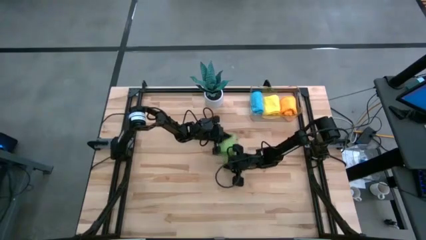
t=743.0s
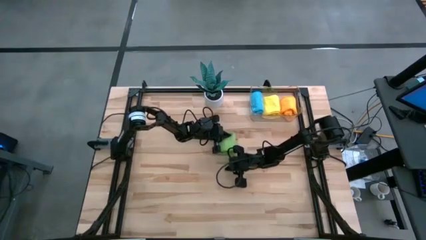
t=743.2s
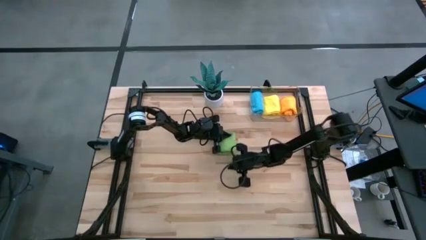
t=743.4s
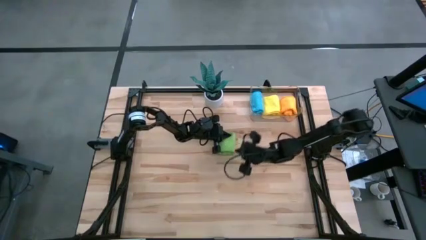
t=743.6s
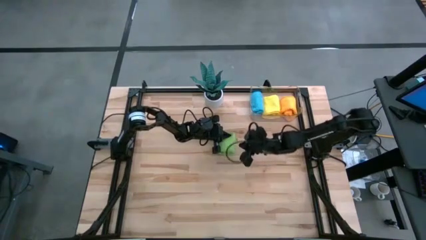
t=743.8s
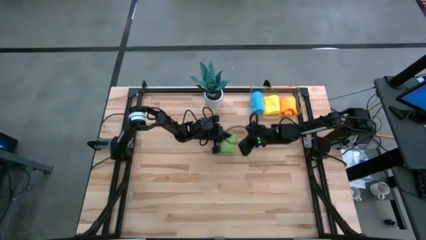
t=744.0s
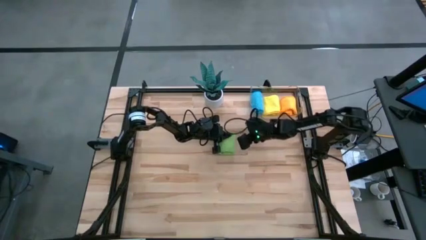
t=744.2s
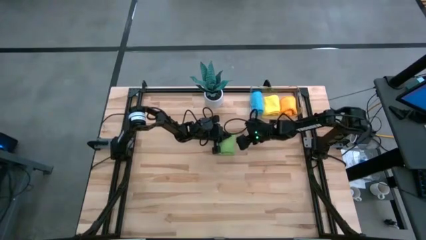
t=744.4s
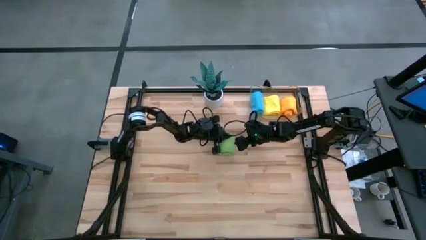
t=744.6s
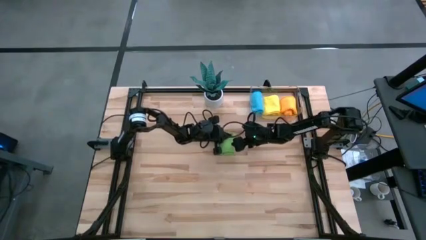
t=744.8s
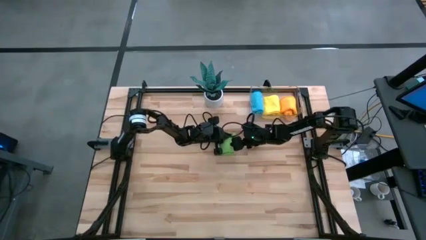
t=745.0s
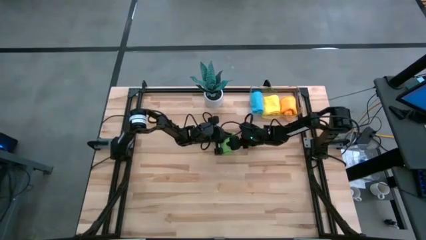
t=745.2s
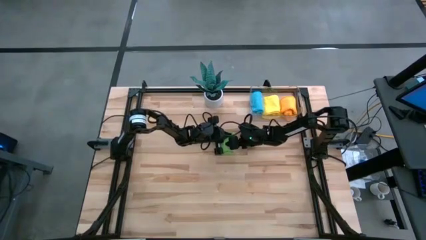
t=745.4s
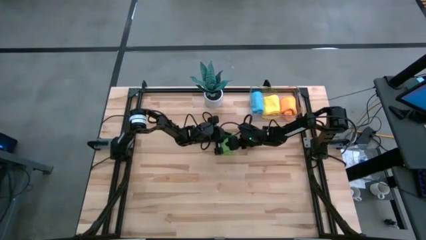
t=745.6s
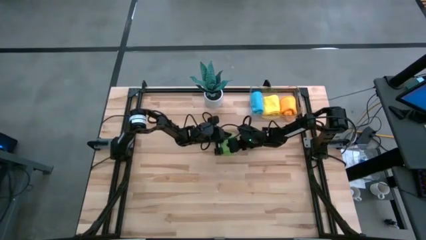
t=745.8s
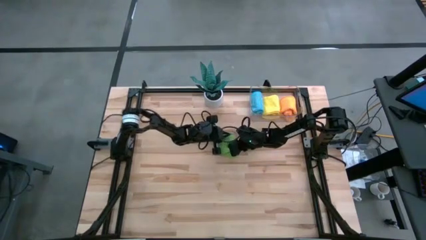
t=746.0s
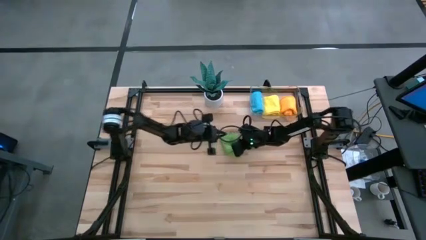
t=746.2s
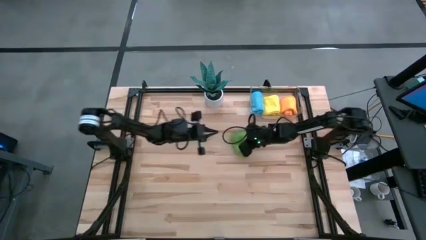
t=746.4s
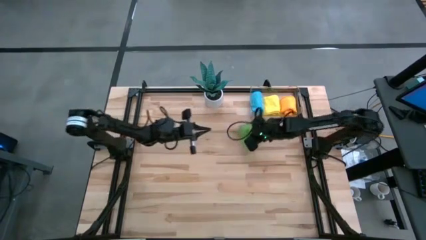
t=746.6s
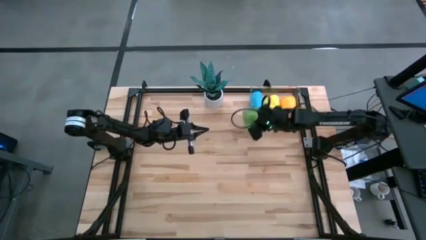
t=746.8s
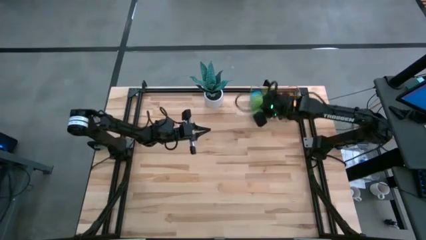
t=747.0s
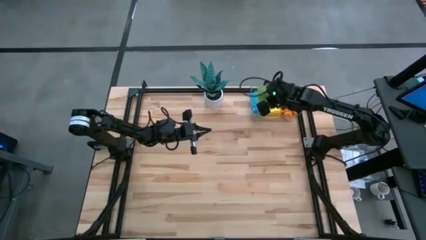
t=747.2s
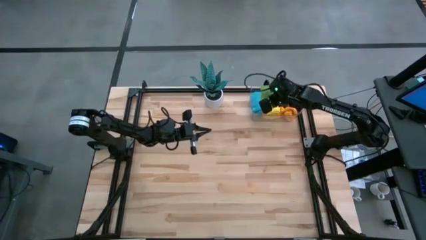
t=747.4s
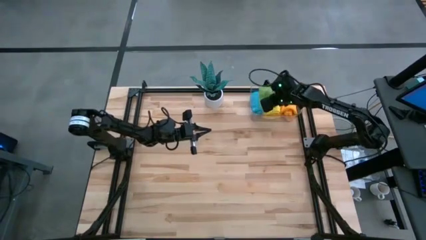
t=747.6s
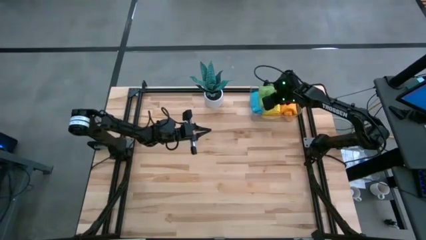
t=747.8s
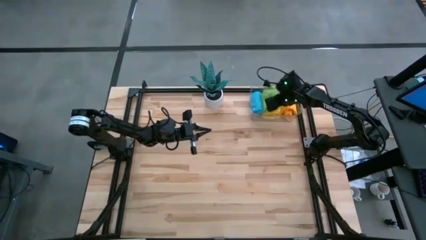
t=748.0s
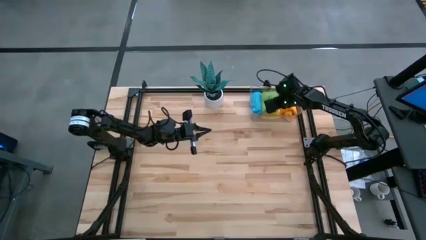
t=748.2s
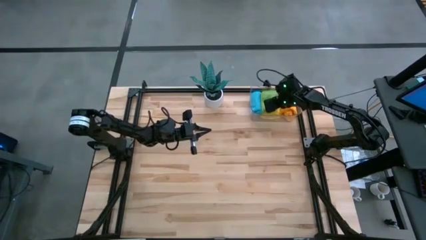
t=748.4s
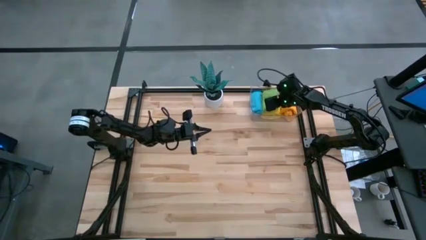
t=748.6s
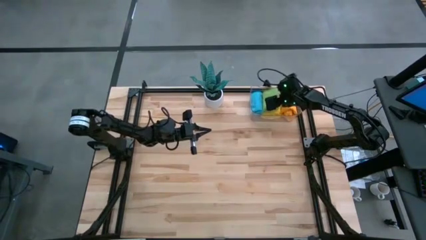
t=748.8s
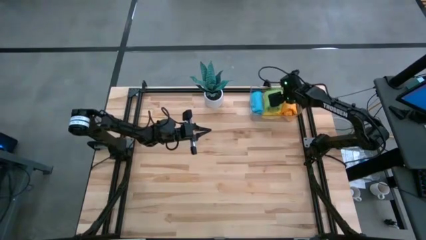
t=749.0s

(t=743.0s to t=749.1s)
Task: Roll microfiber towels into tight, uniform cylinder then place into a basket
Put the green microfiber into the transparent bin

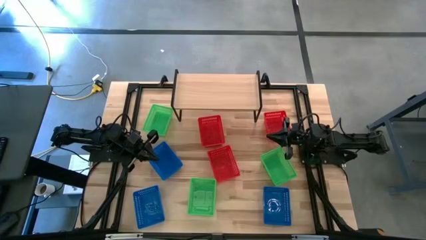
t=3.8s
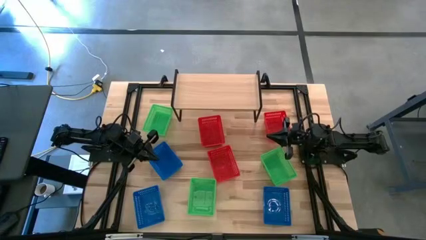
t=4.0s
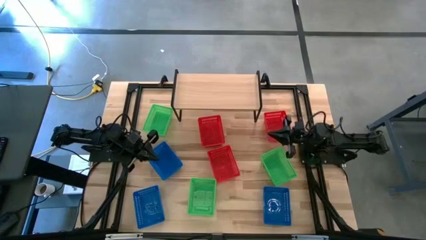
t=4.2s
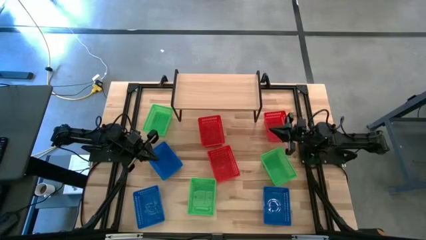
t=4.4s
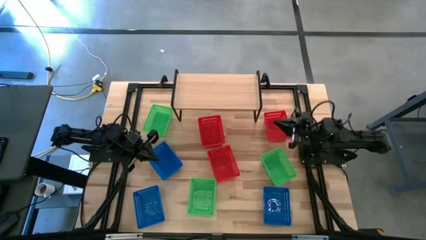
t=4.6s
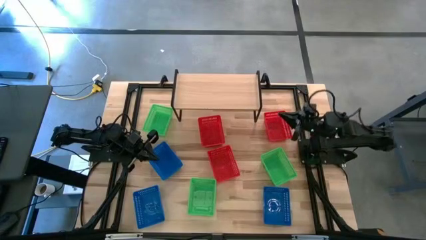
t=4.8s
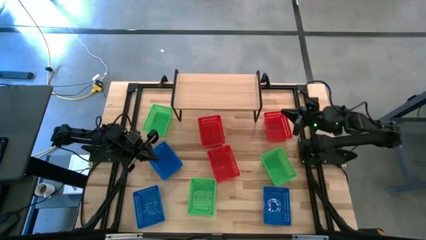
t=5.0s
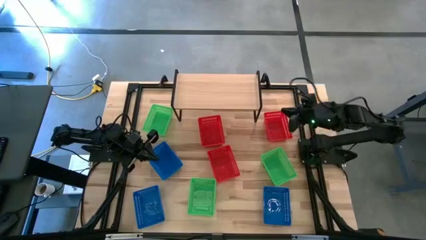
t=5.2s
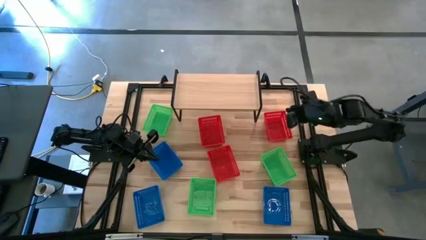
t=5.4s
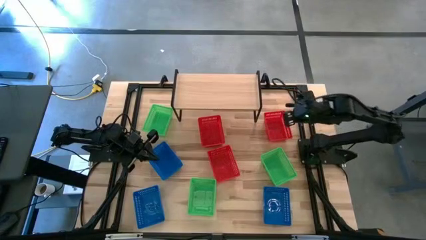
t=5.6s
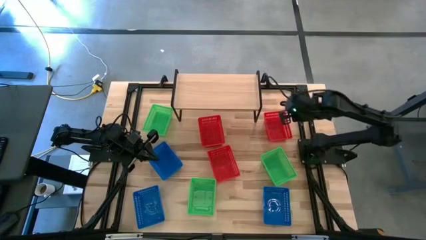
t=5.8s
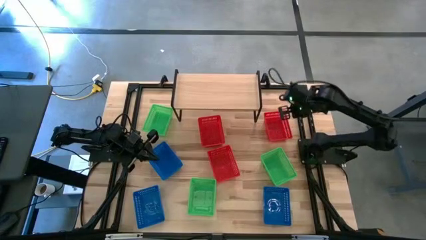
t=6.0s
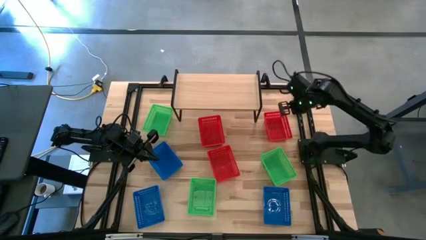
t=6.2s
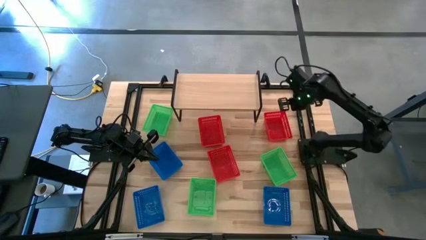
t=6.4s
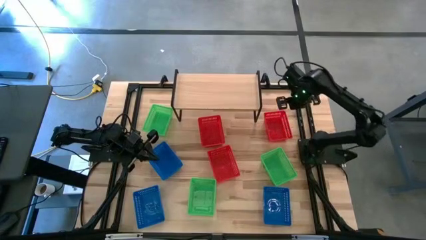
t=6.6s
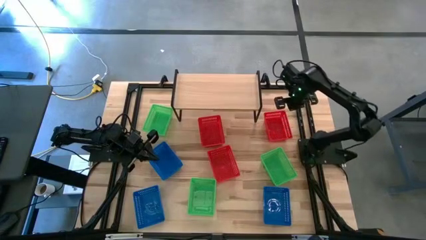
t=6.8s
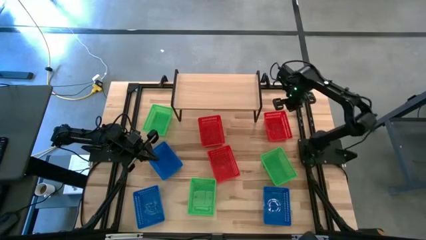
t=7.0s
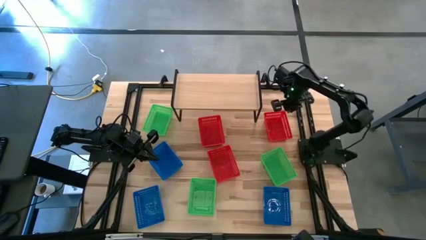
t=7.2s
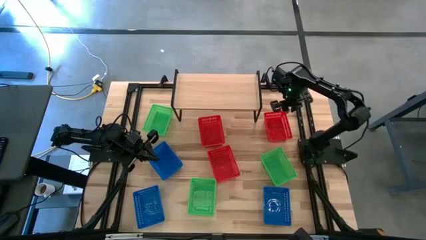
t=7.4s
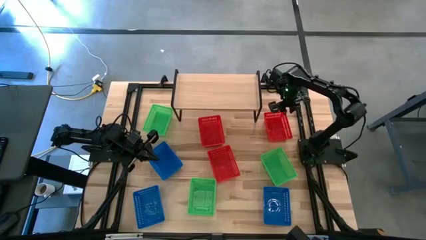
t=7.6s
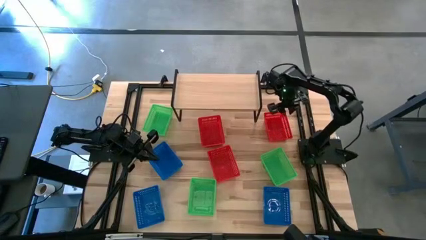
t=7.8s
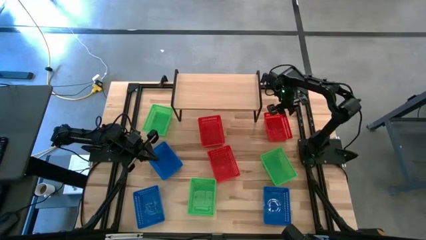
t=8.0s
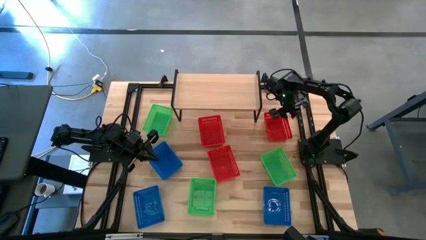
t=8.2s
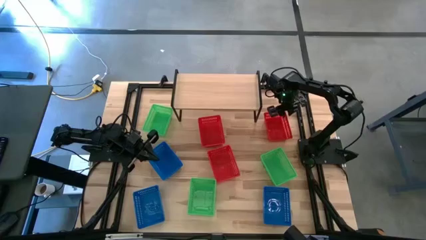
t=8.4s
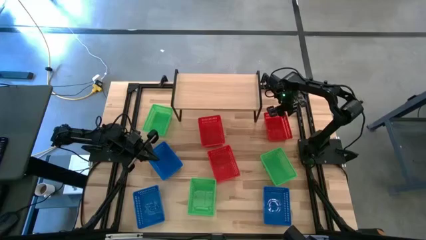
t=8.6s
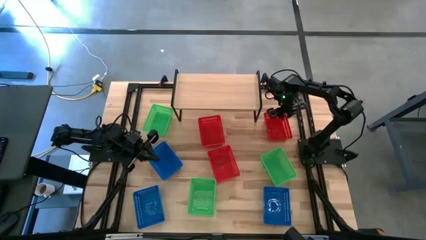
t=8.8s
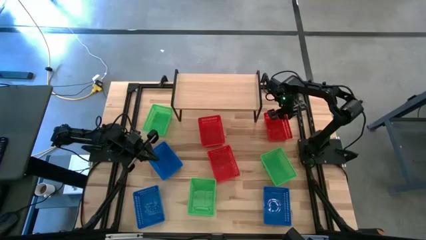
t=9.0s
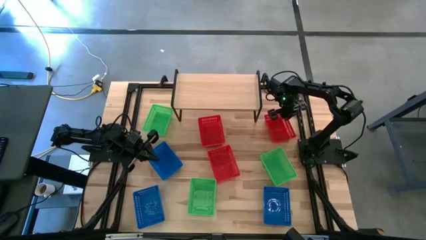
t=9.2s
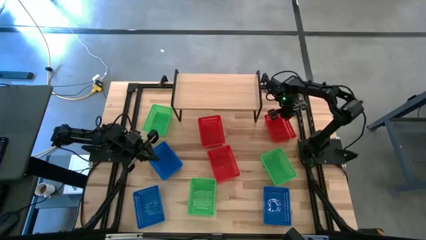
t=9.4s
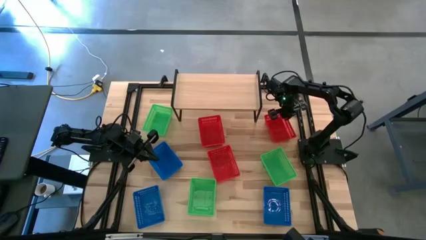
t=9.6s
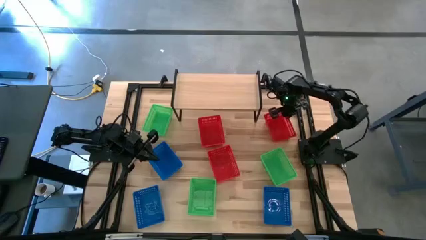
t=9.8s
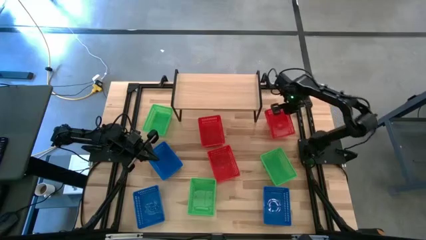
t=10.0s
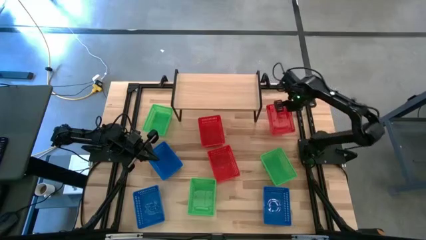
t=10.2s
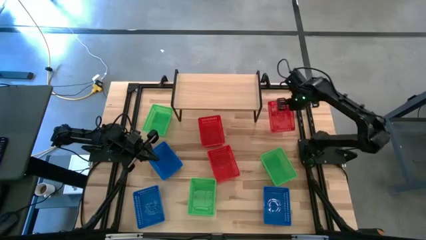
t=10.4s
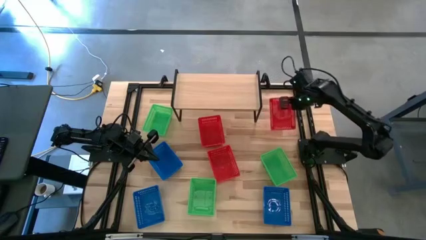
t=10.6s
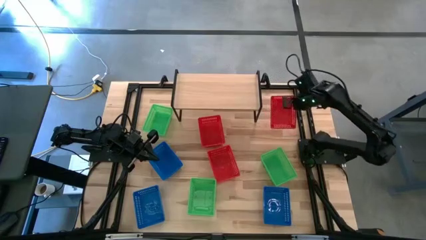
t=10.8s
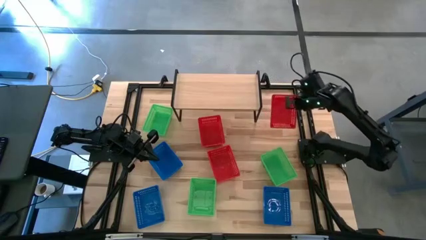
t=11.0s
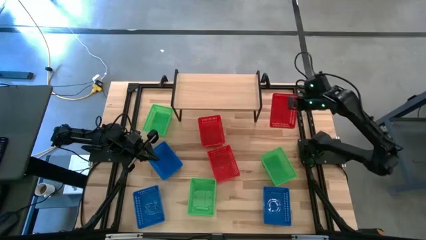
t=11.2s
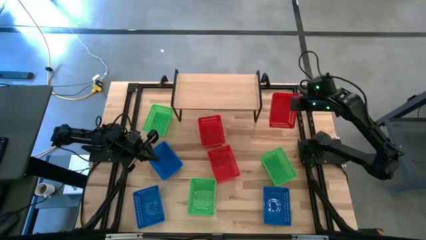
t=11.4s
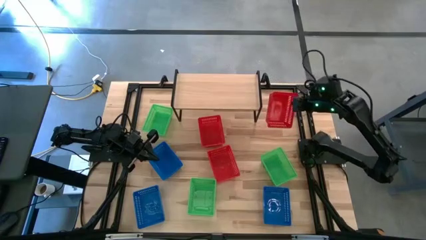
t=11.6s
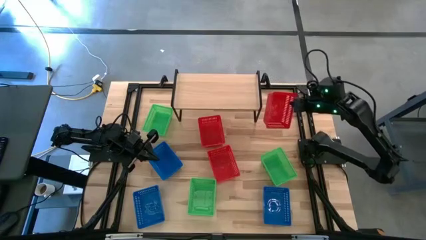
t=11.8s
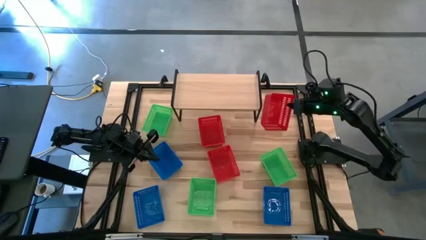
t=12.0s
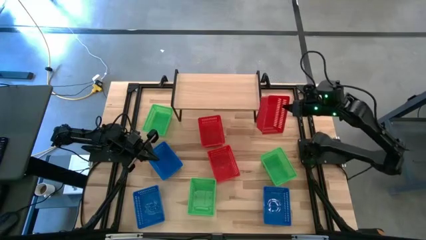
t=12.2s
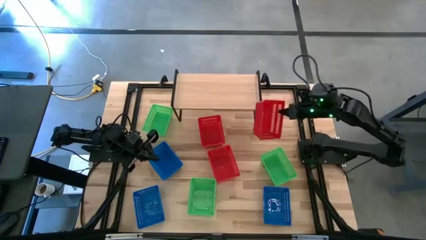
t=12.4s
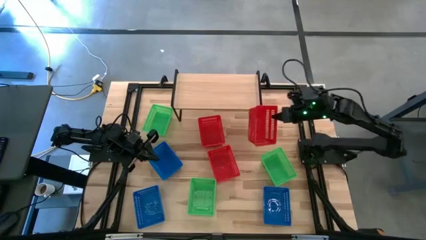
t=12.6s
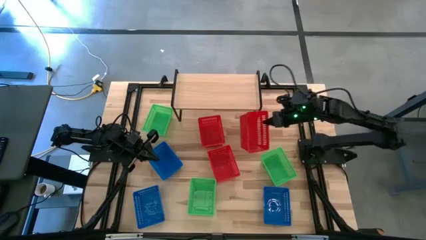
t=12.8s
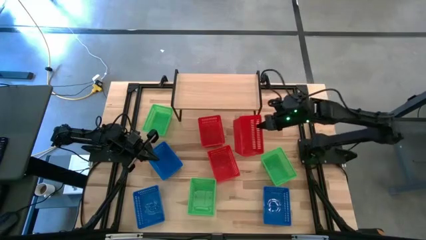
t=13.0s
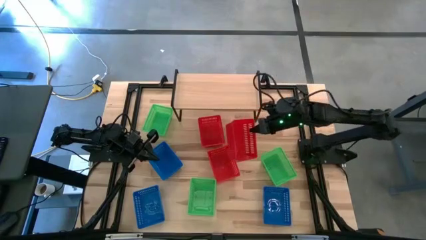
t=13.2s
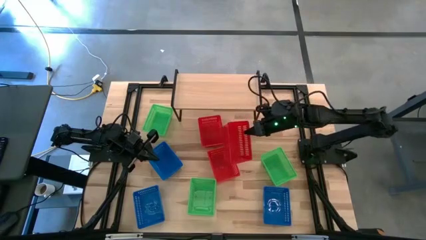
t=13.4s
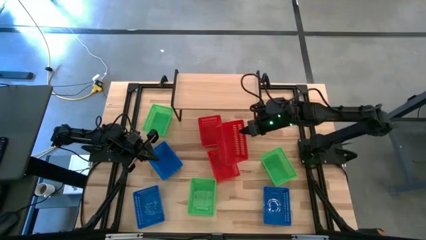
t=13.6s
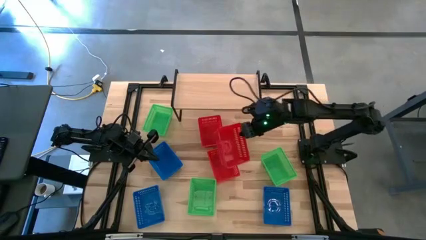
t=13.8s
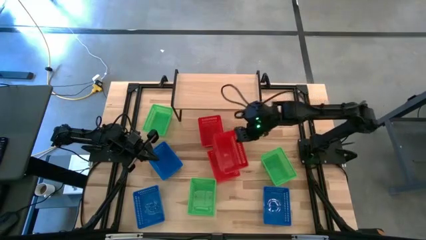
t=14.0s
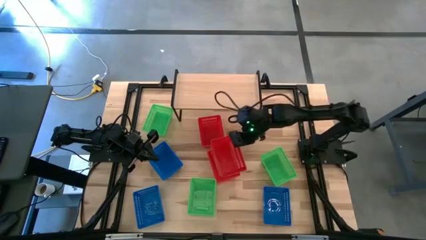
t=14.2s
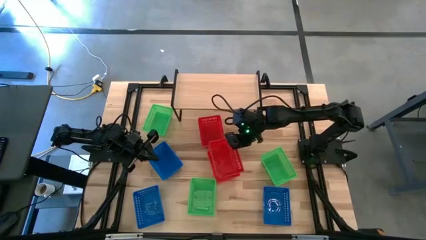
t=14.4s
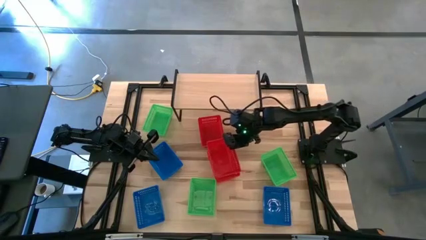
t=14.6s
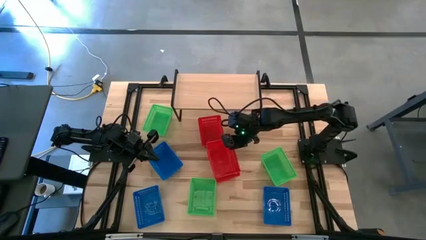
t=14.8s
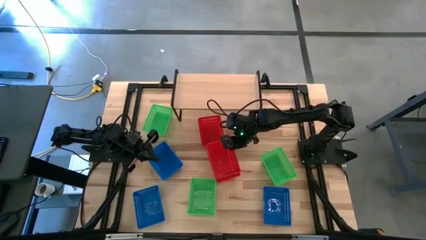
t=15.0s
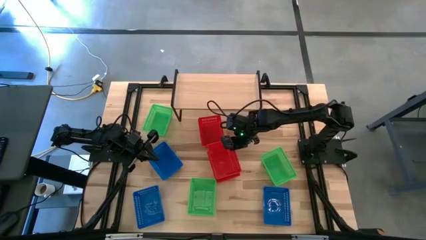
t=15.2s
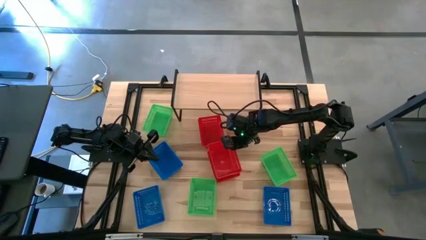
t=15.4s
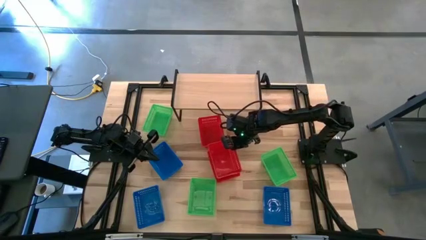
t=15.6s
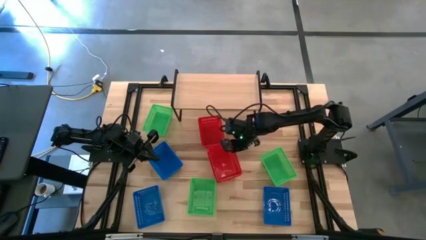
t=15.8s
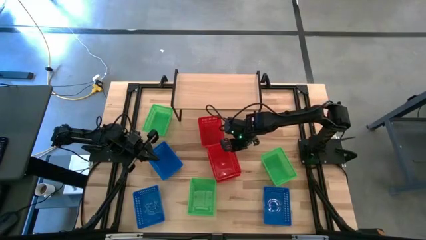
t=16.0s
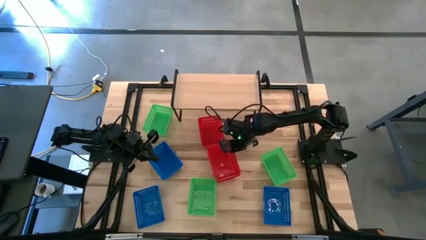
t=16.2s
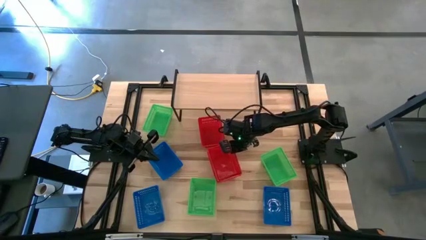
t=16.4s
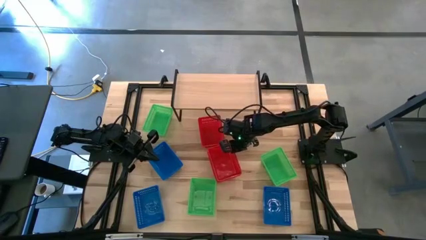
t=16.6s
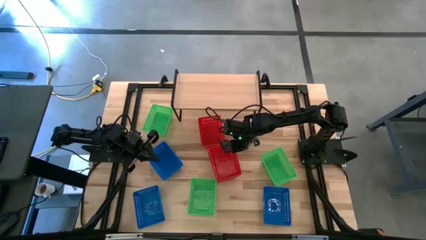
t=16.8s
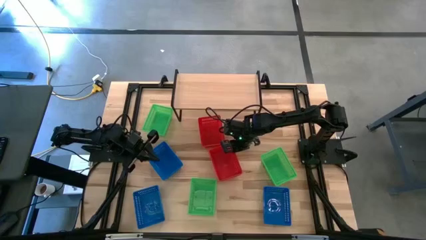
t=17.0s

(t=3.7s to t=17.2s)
Task: Stack baskets on shelf by color
Stack the top right red basket on the top of the bottom red basket
